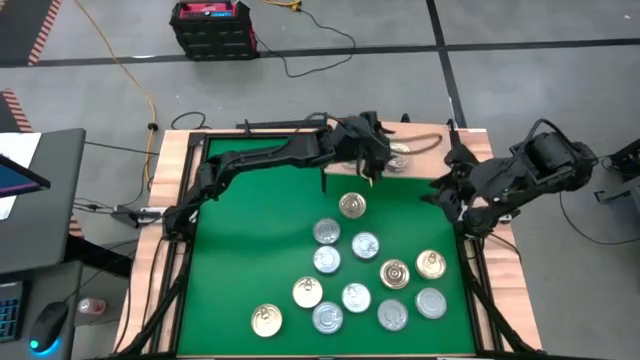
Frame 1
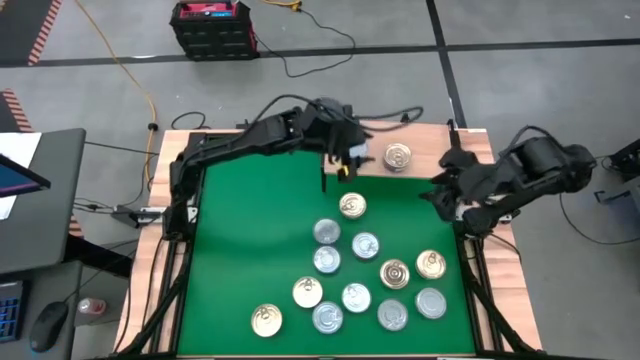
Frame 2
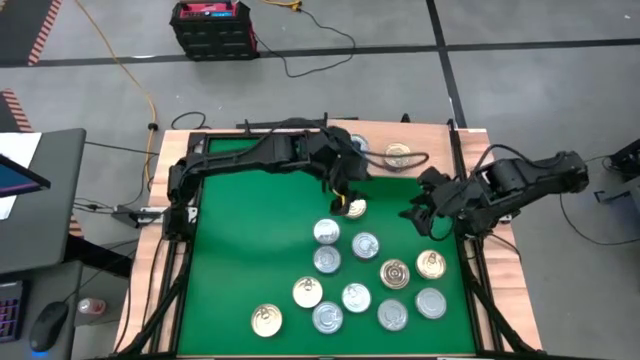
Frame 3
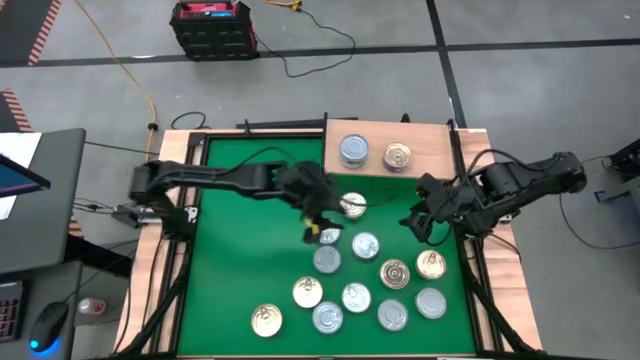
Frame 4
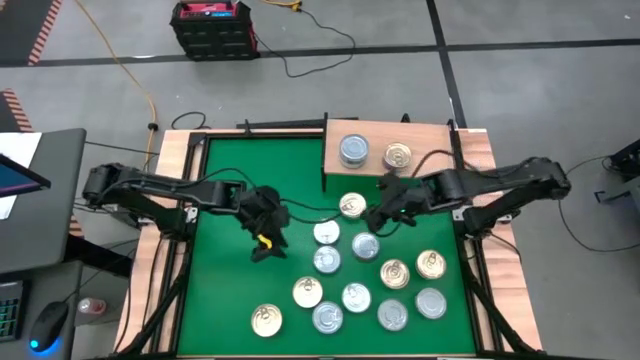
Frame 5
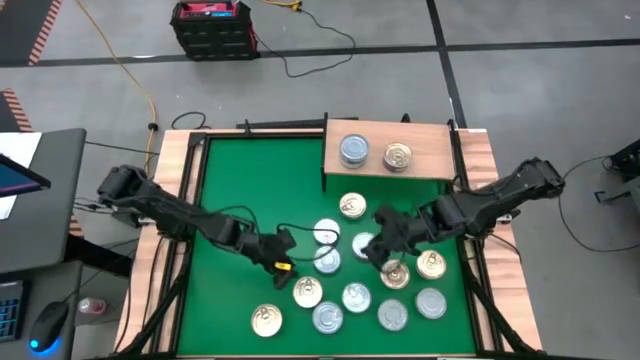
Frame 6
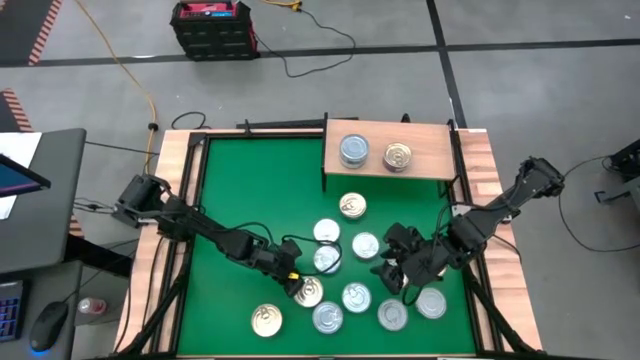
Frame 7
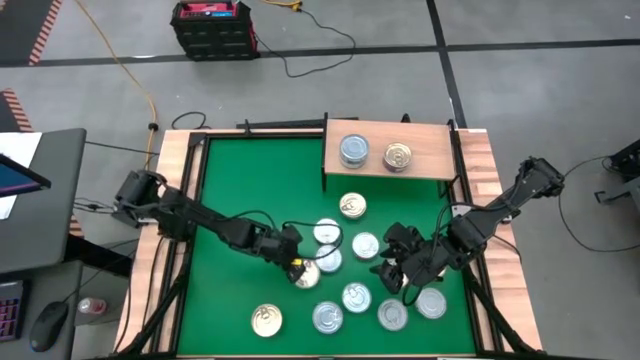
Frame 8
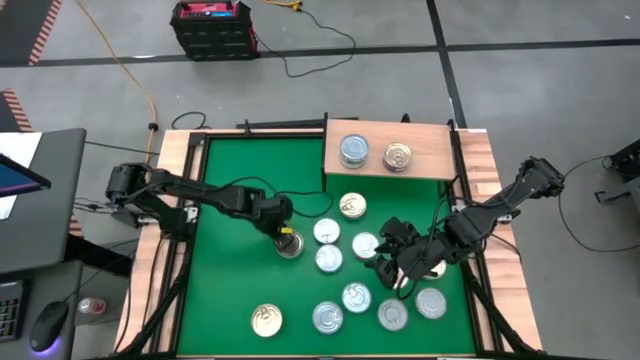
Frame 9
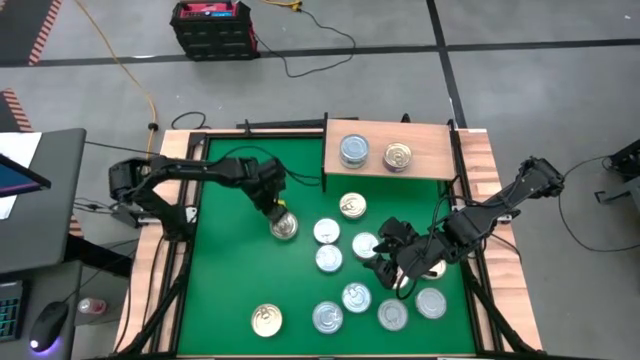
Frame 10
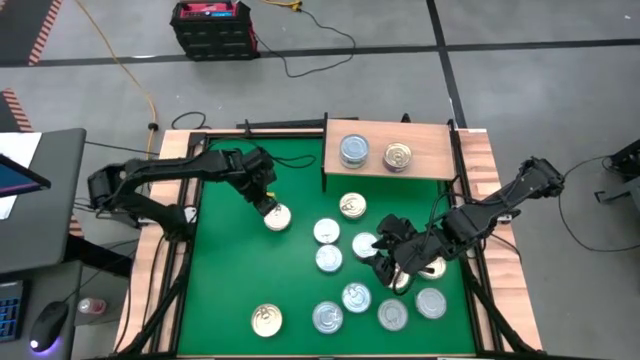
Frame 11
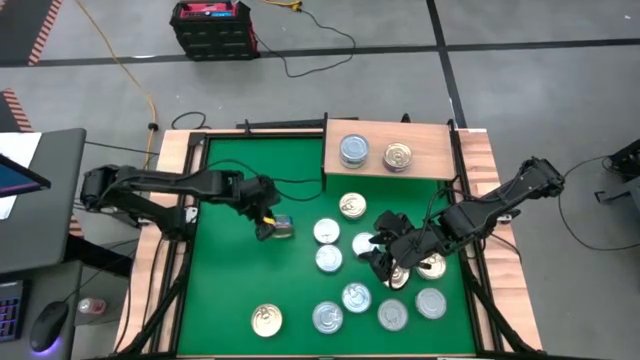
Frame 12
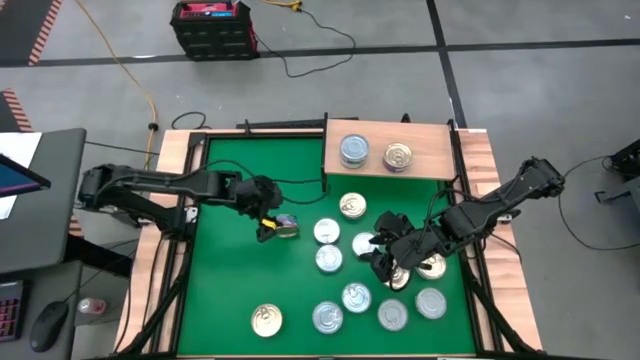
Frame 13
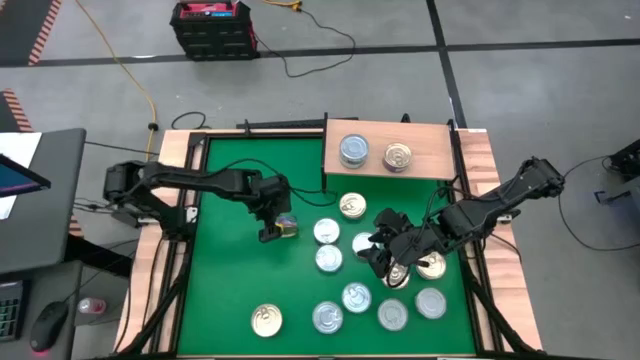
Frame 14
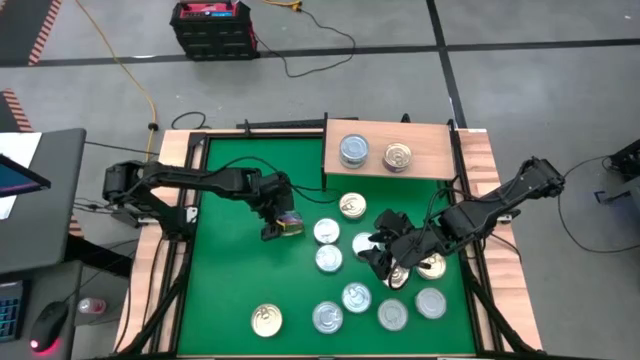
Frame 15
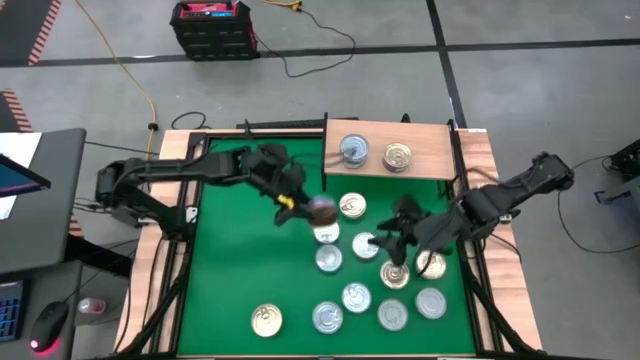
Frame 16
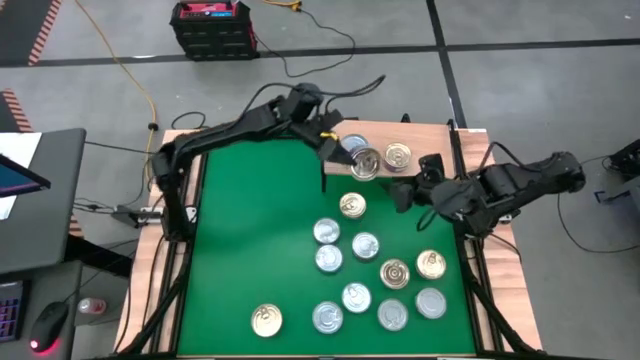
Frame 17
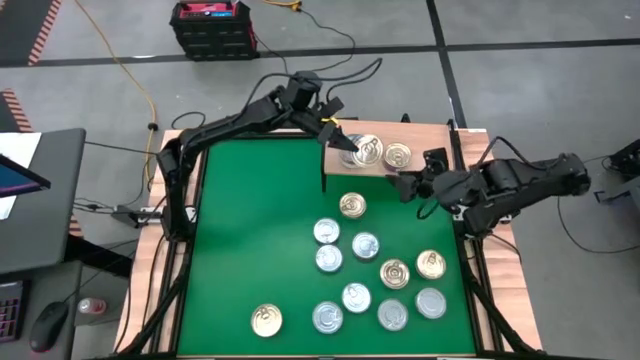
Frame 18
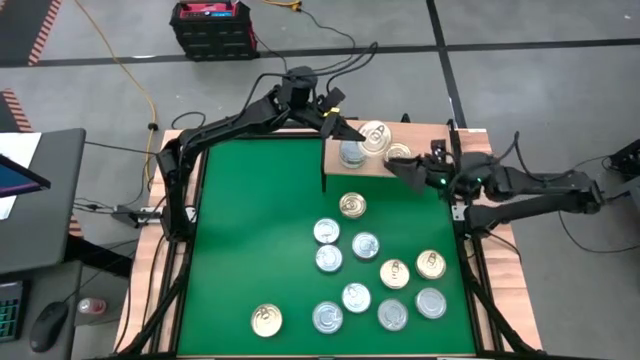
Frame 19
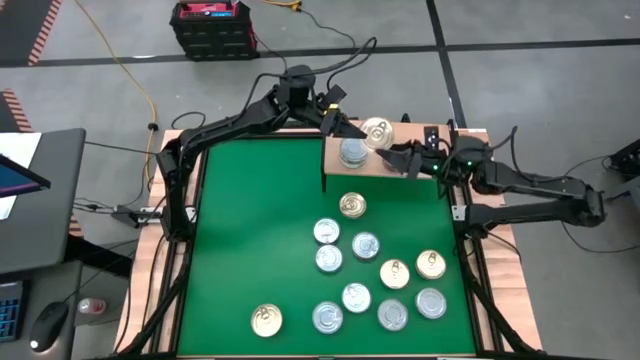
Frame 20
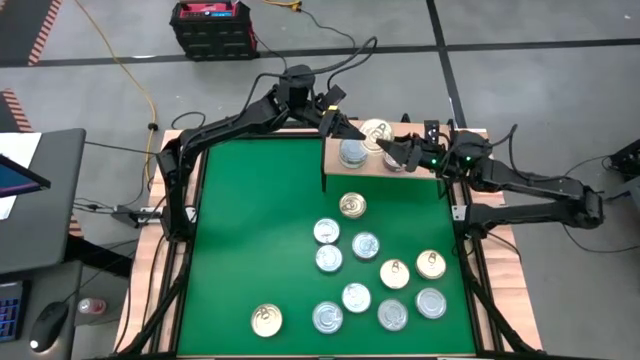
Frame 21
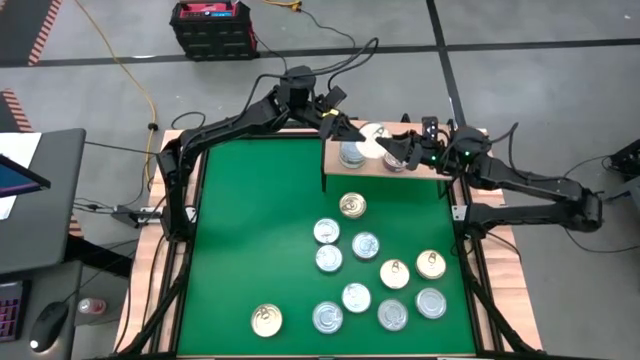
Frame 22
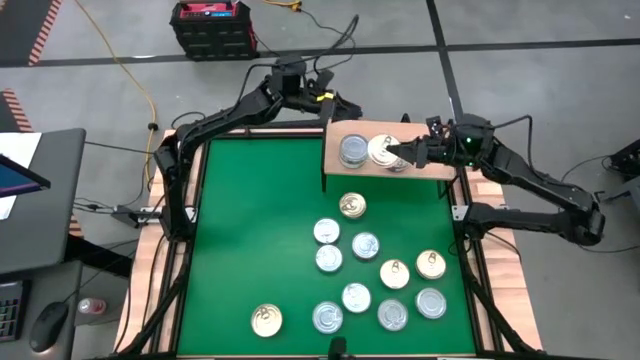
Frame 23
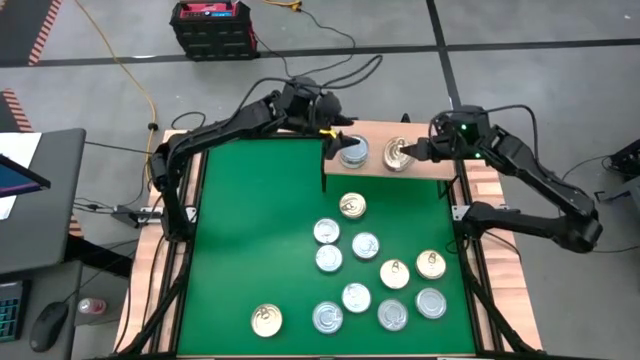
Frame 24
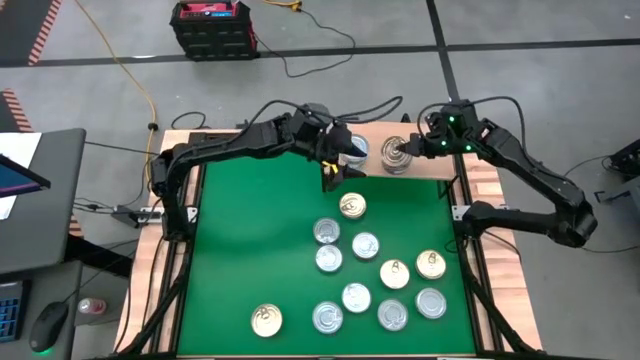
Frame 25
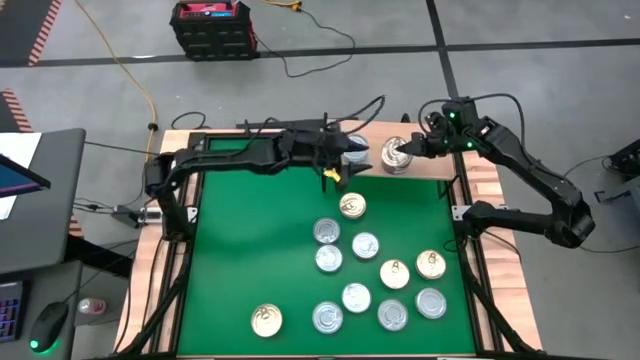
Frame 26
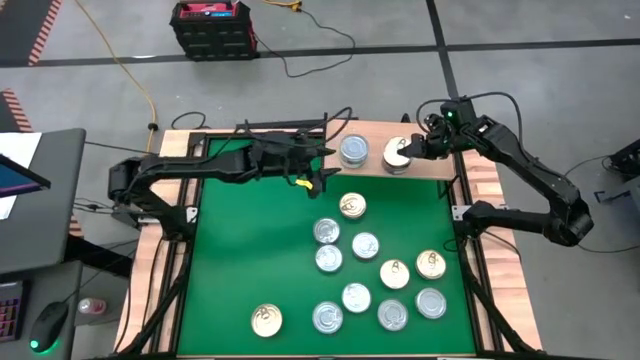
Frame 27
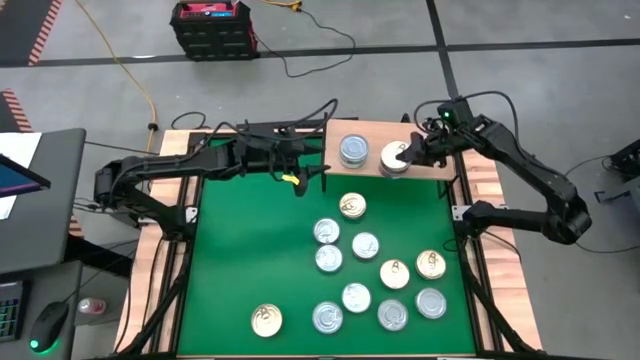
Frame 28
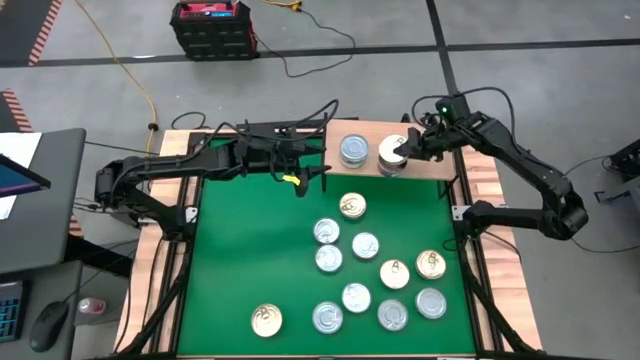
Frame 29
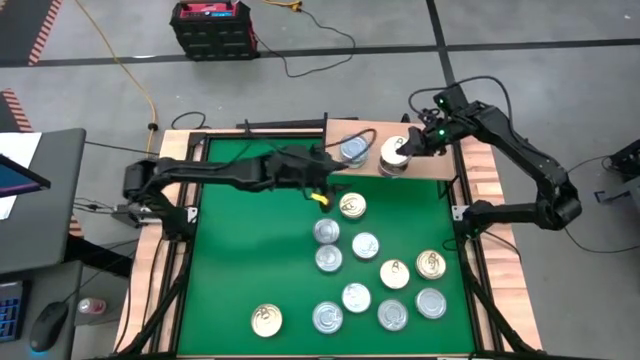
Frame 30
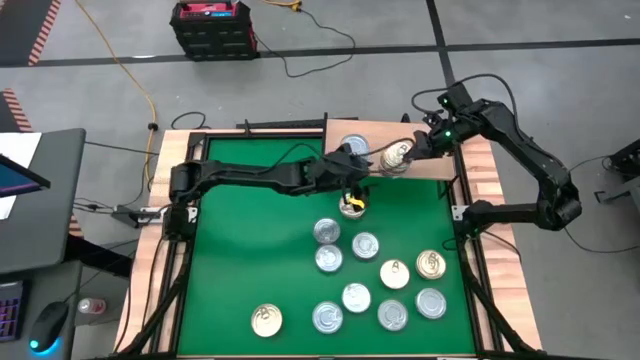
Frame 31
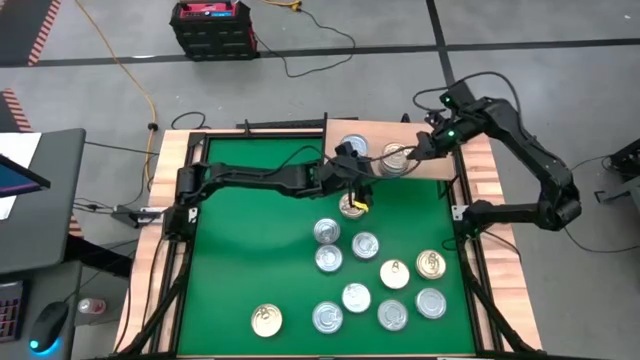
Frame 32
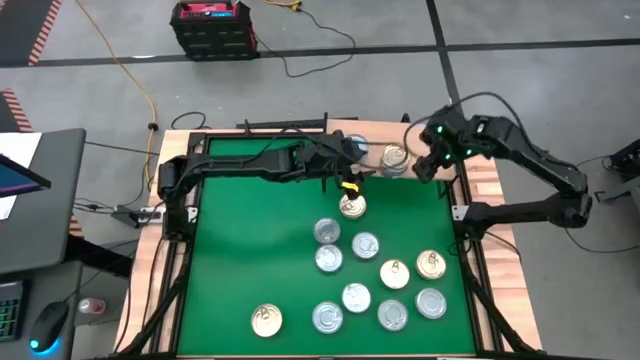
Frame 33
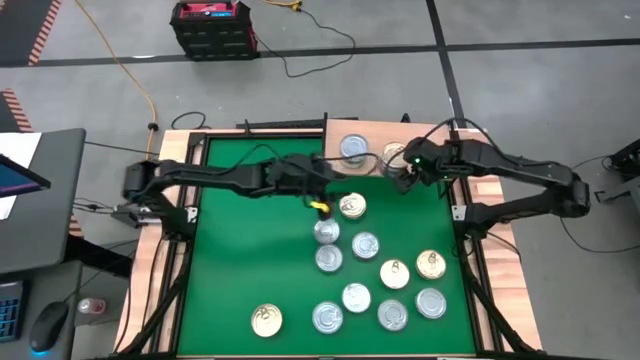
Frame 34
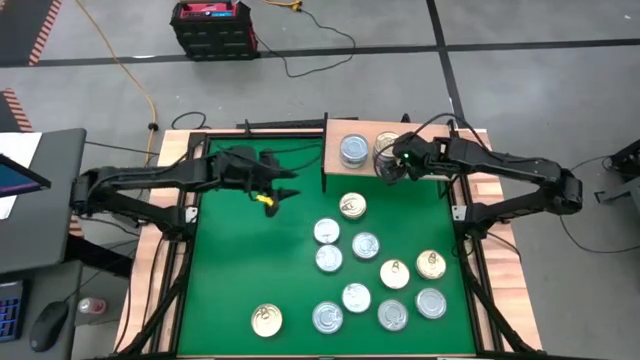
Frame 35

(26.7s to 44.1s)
Task: Stack canned seafood by type on shelf
Stack the pink tuna can on top of the pink tuna can

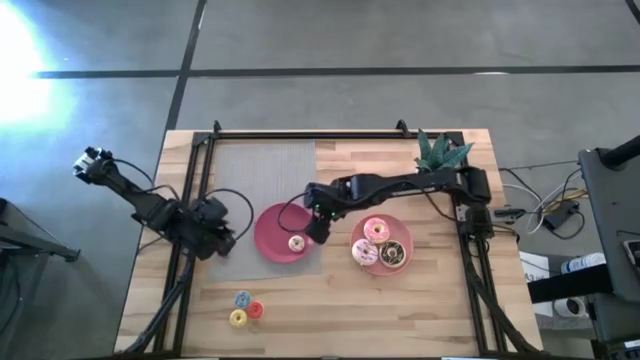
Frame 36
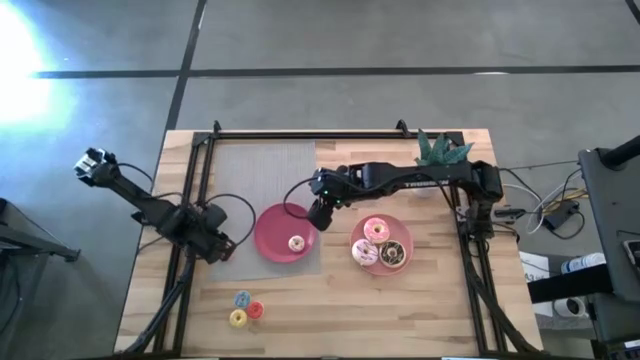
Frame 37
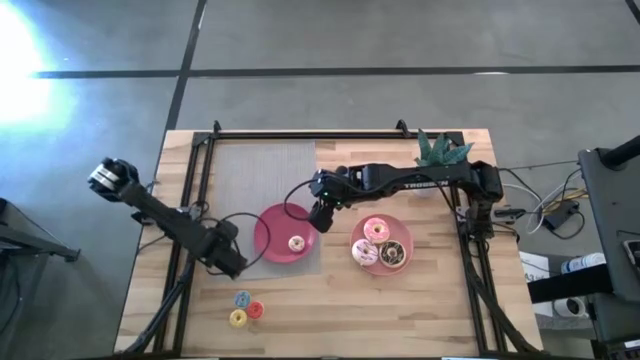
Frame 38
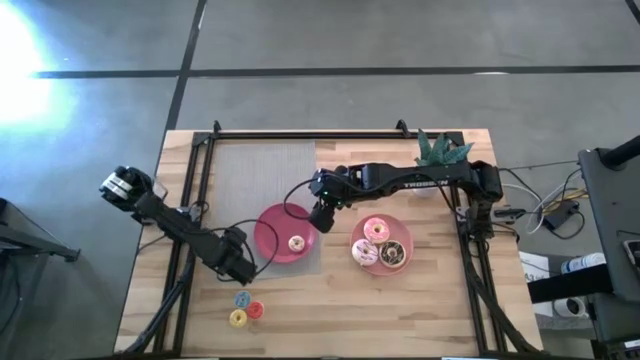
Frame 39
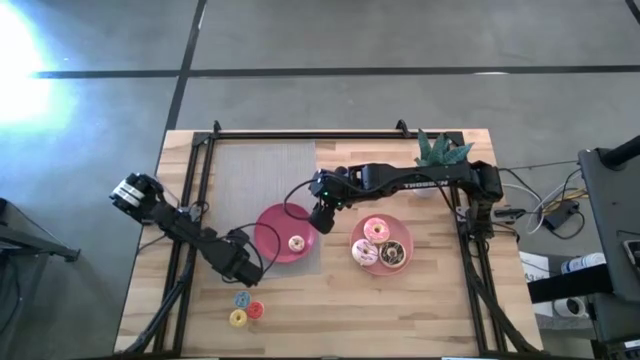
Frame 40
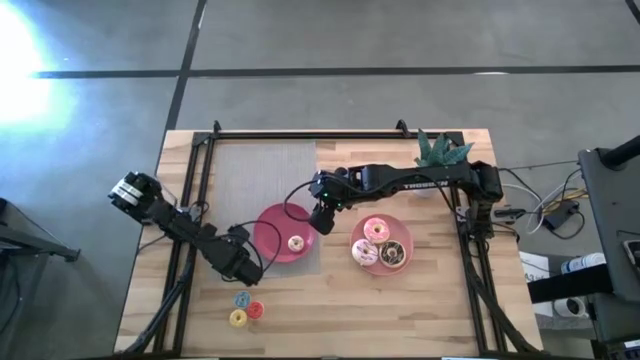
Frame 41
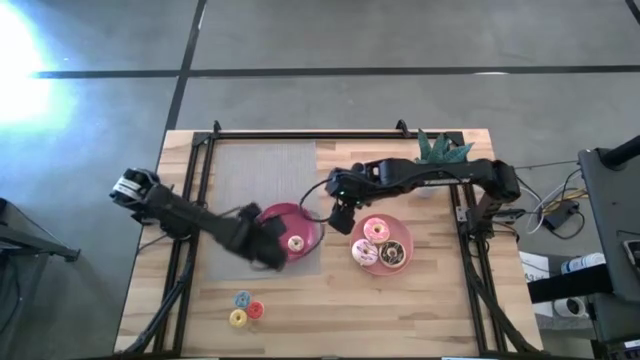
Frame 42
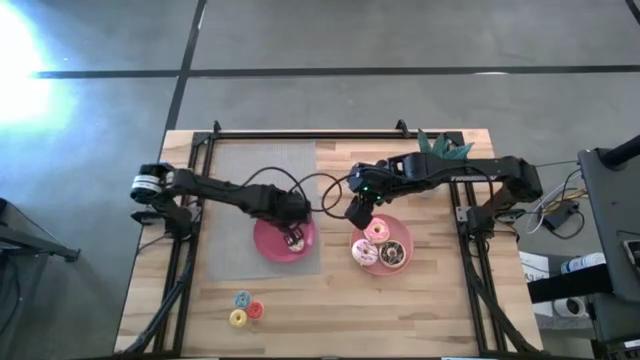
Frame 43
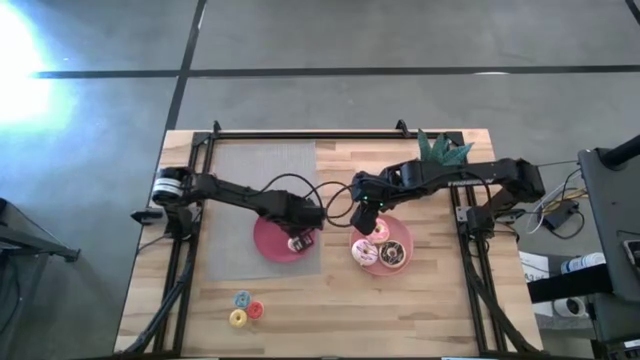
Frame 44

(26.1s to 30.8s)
Task: Pick & Place donuts
Put the small orange donut on the dark pink plate
